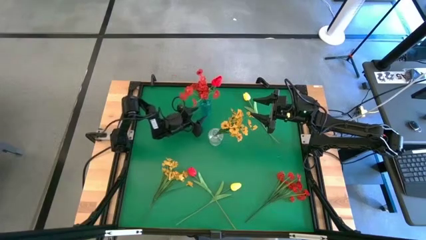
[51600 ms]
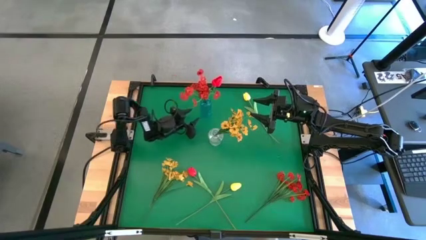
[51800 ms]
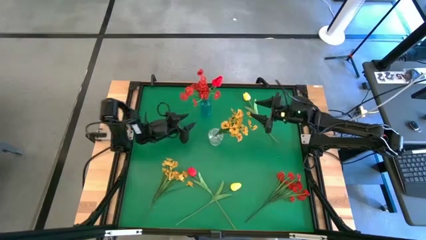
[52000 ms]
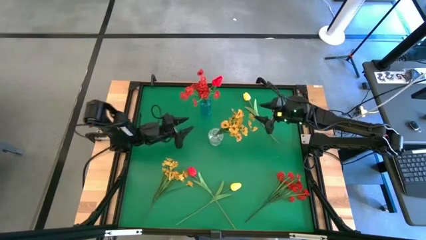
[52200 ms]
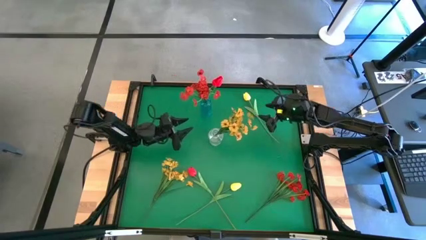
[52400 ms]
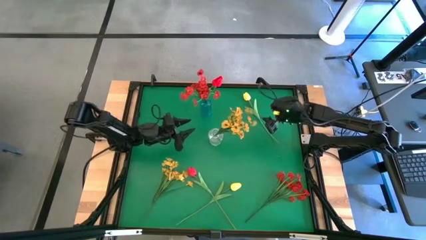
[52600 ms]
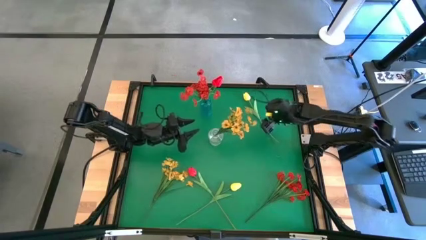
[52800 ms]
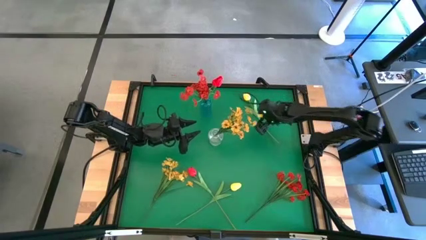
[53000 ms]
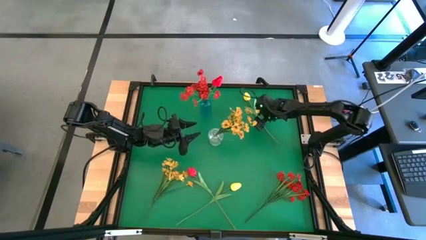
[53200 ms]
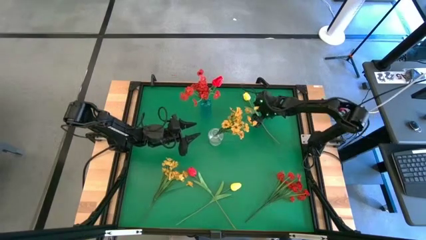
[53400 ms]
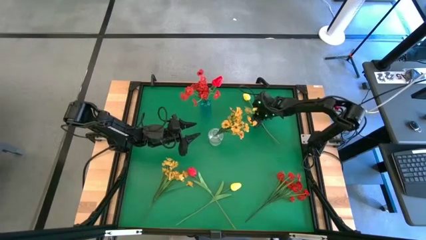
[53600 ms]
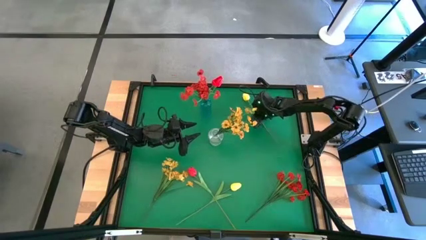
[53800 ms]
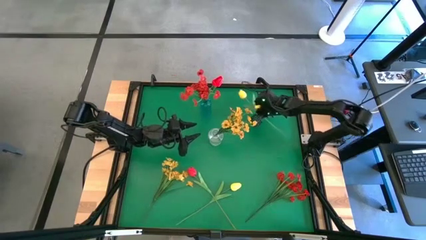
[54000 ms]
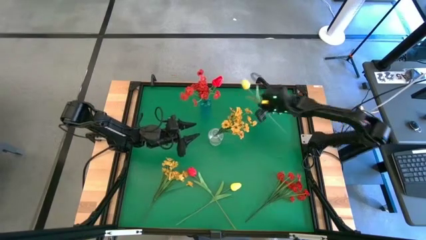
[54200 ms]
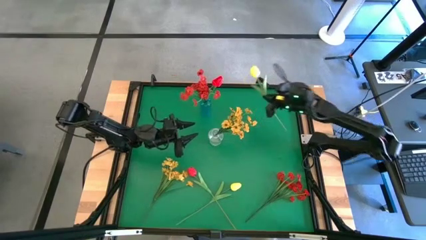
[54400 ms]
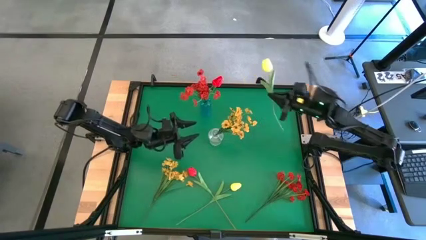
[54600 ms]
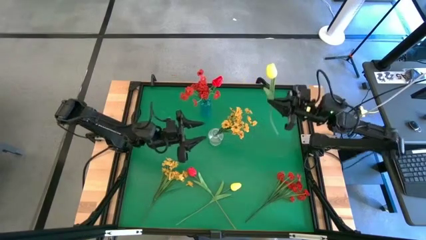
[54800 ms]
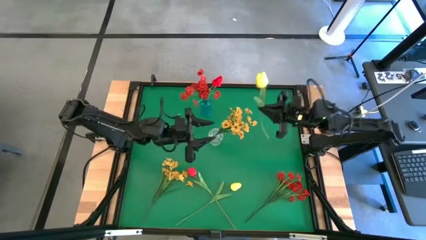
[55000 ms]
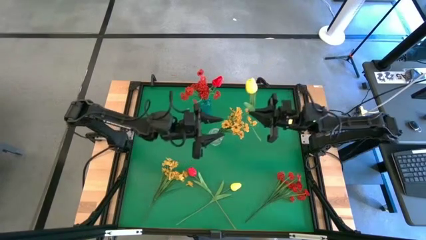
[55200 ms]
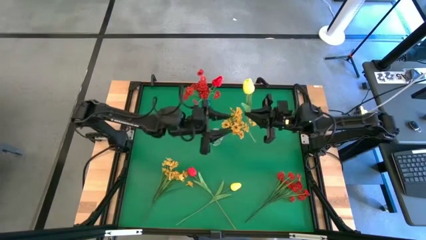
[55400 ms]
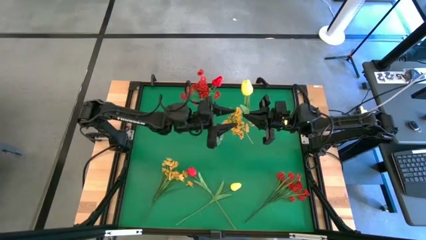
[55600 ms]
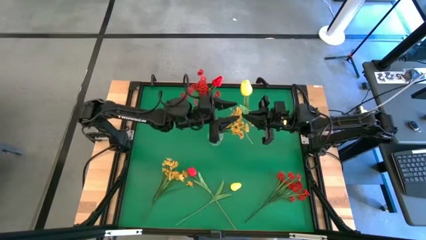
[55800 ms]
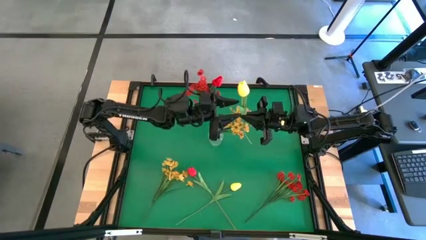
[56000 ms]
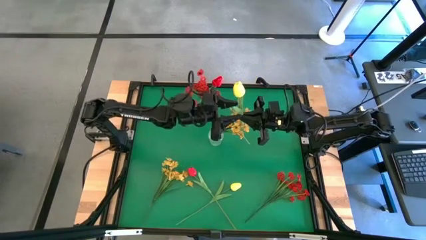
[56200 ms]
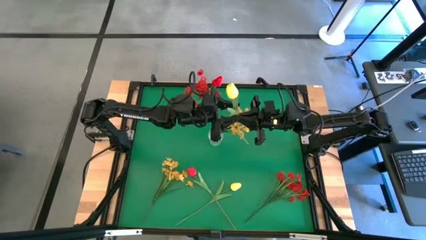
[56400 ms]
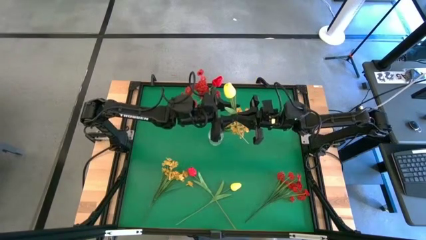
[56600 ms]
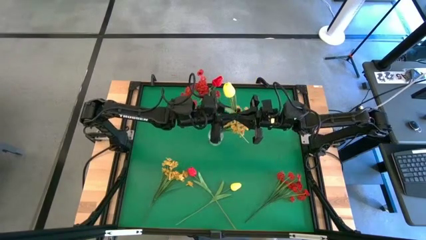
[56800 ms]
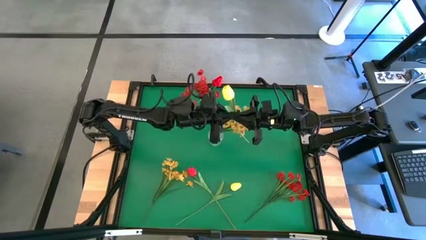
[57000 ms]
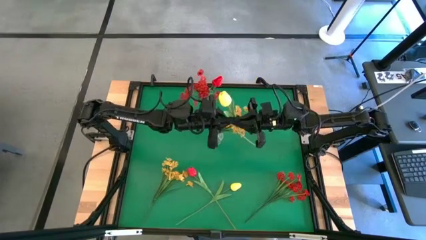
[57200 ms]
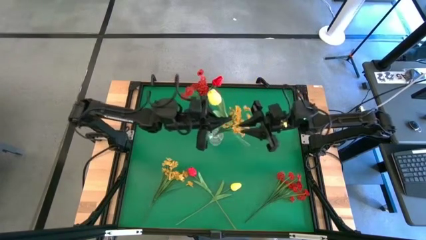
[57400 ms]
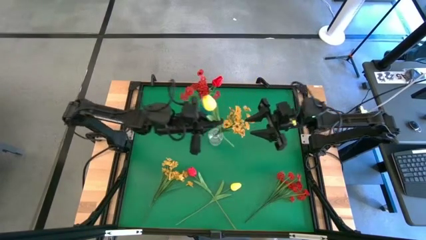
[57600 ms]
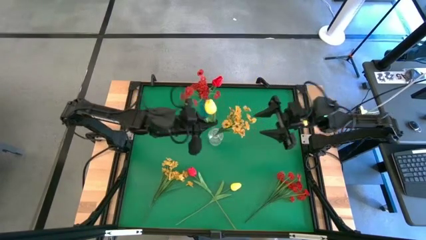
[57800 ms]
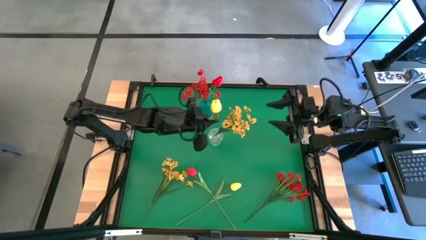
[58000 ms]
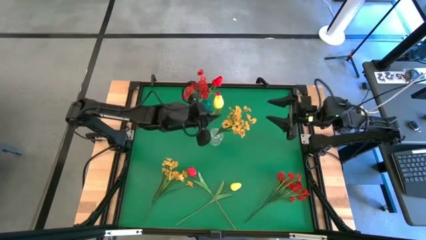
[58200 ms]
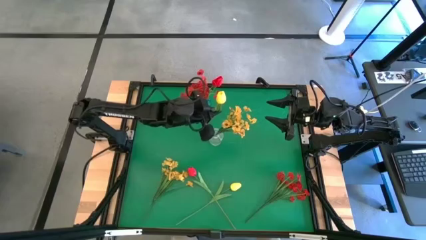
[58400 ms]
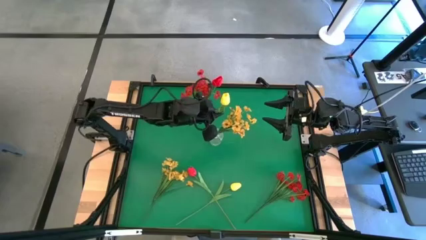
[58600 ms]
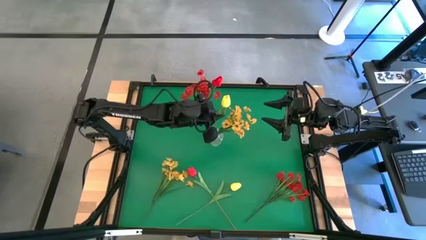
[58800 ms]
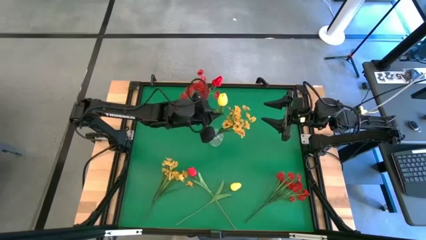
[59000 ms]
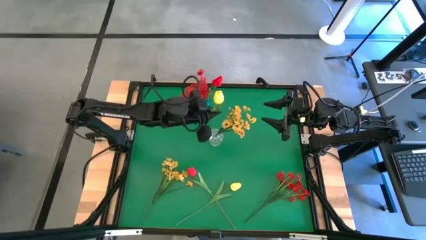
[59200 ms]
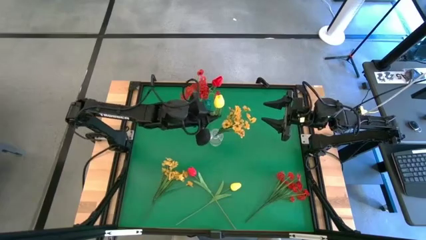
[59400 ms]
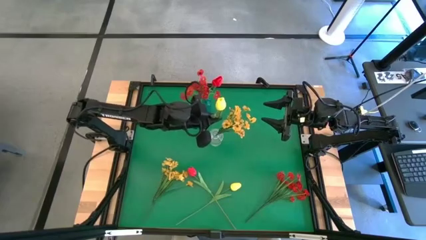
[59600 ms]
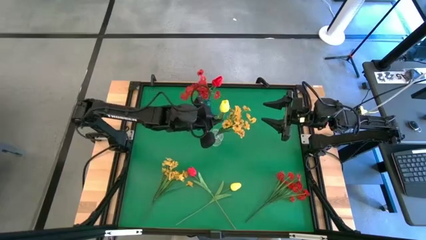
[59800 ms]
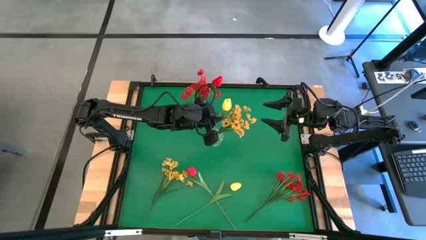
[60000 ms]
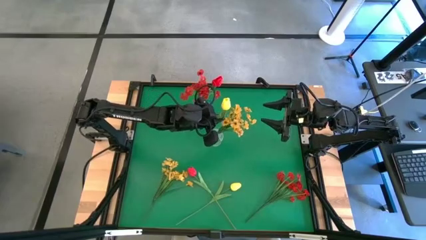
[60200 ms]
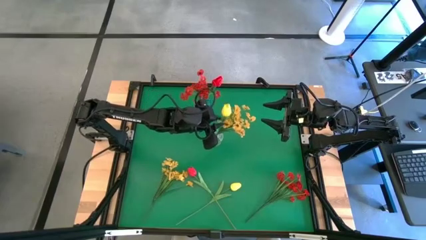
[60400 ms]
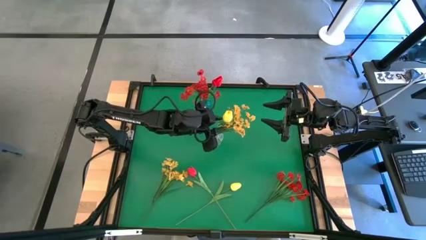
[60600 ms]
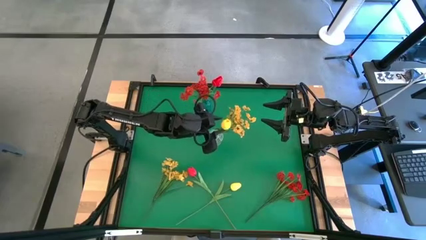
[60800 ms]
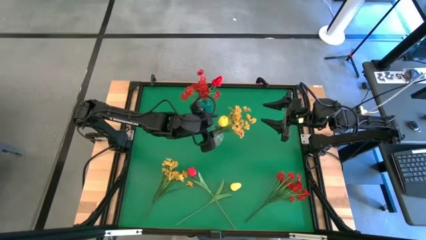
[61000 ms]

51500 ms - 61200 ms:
Task: Sort flowers into vase by color
Put the top yellow flower into the transparent vase

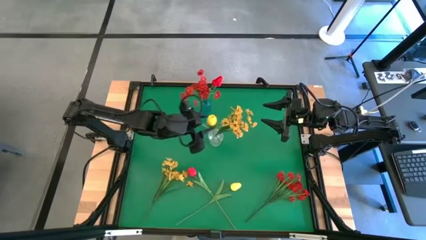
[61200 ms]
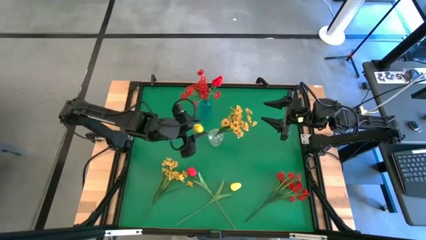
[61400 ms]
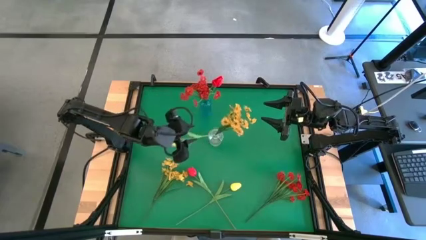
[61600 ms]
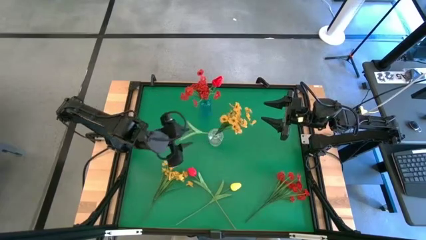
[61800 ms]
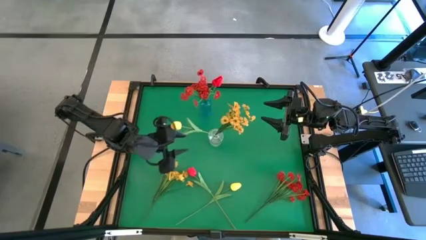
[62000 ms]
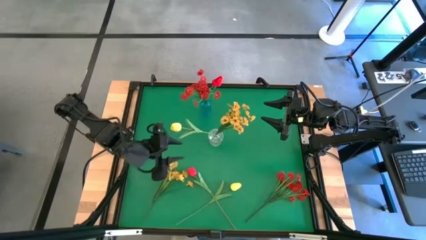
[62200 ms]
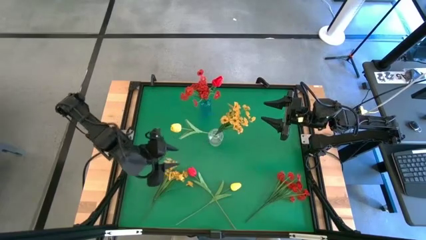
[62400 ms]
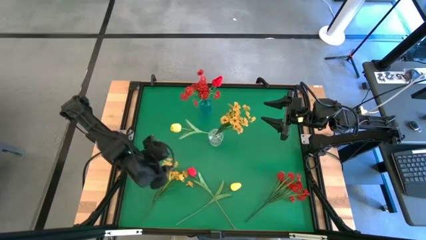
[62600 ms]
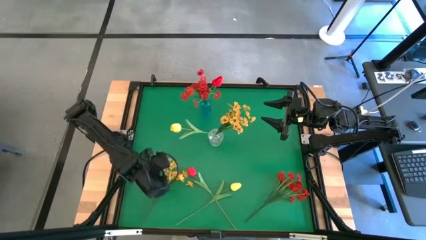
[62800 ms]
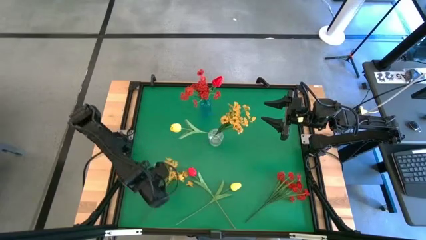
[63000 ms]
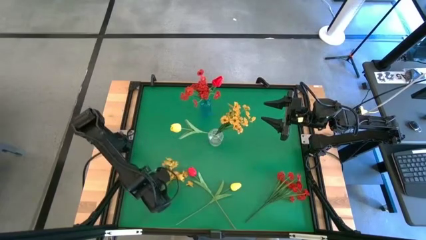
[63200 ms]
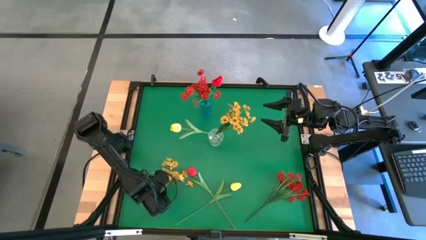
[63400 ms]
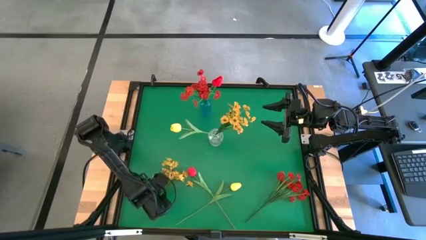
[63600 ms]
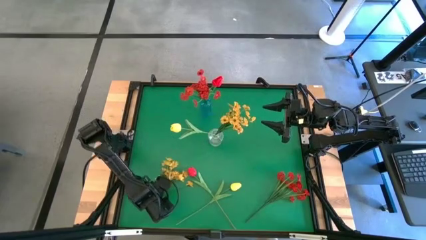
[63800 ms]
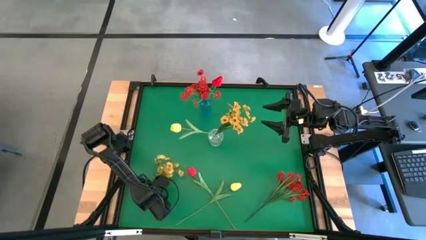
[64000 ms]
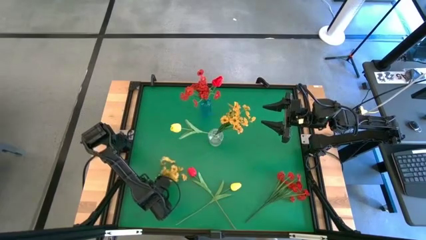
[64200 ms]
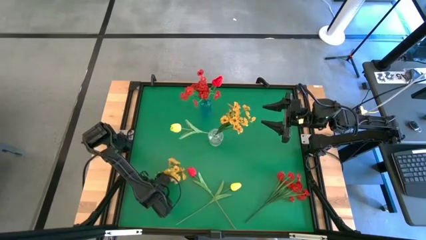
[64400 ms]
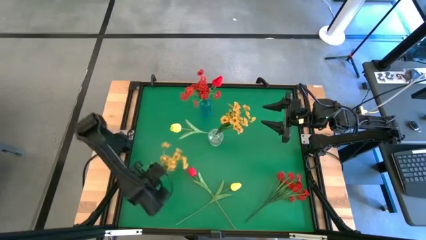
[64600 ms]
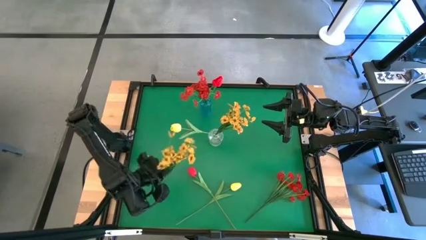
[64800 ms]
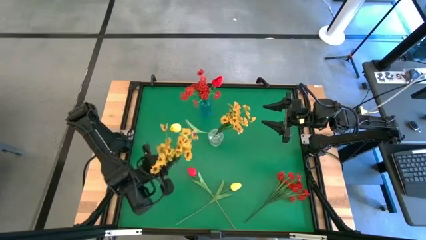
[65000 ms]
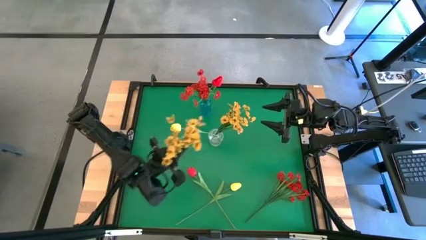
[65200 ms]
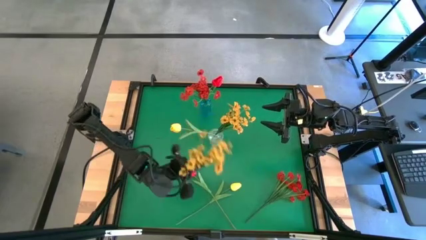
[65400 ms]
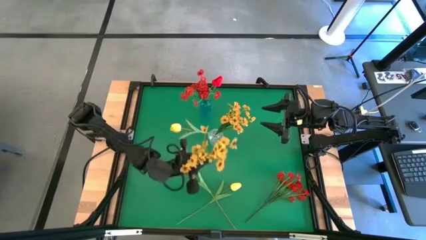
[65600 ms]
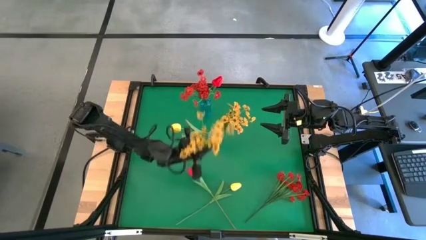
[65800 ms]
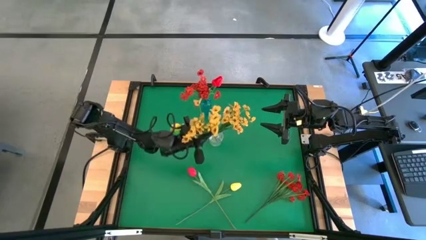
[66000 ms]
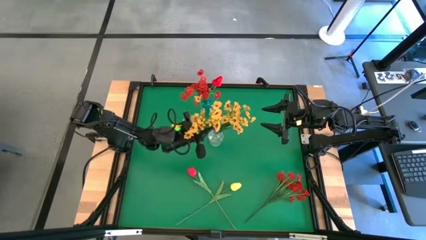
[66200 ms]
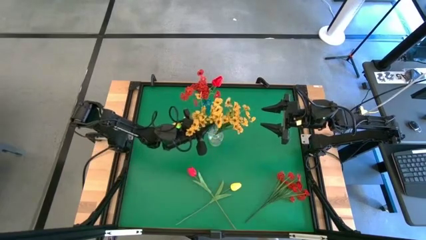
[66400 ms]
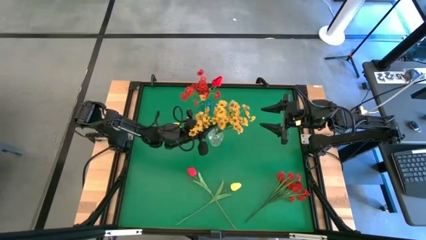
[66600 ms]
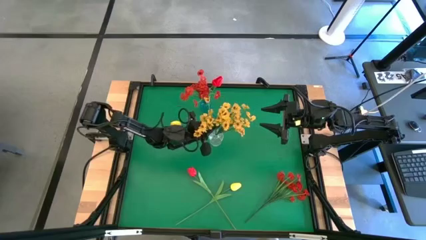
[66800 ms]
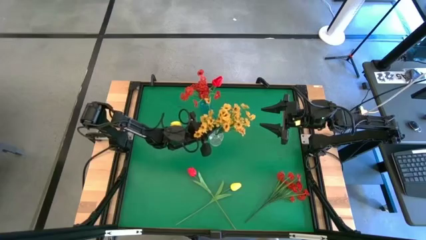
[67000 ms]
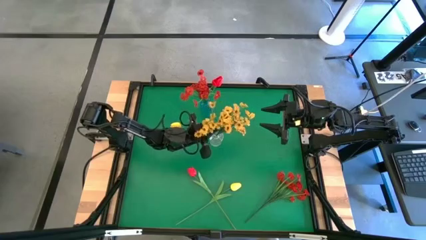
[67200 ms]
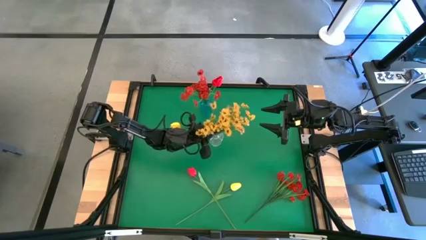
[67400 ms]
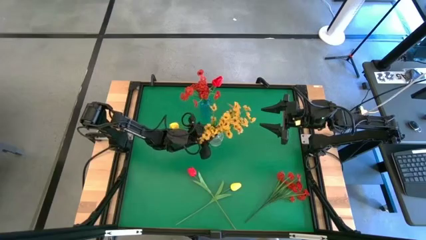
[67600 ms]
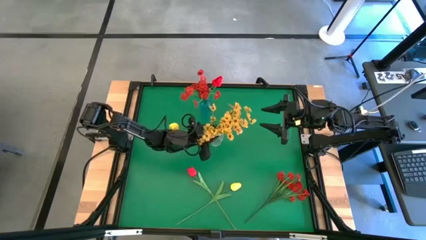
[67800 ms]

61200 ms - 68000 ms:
Put the yellow flowers into the transparent vase
